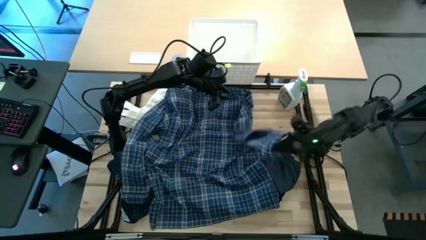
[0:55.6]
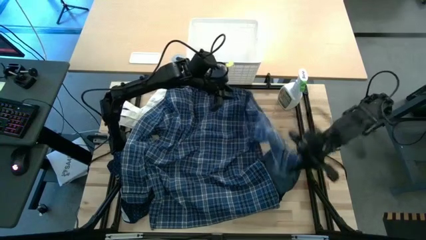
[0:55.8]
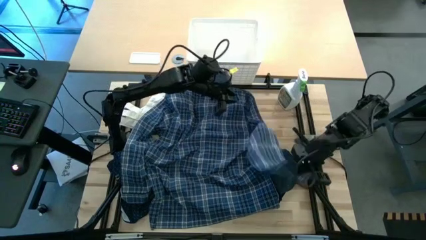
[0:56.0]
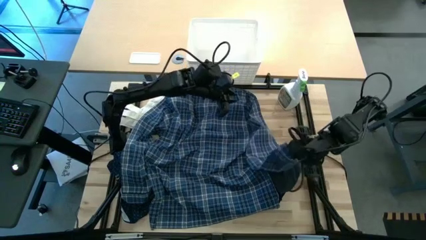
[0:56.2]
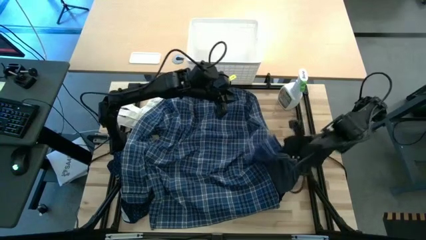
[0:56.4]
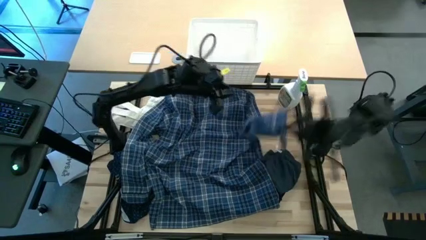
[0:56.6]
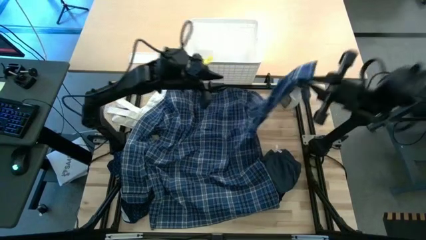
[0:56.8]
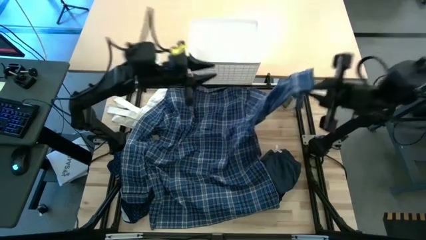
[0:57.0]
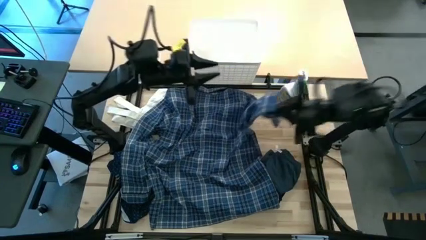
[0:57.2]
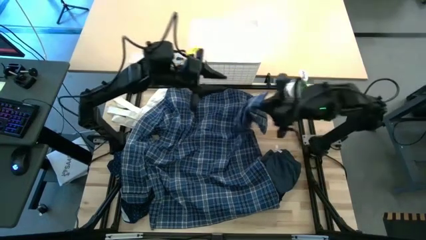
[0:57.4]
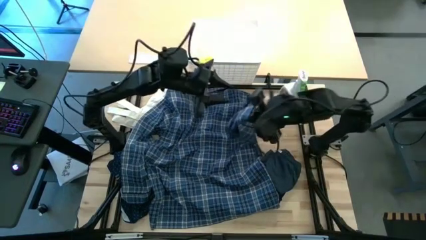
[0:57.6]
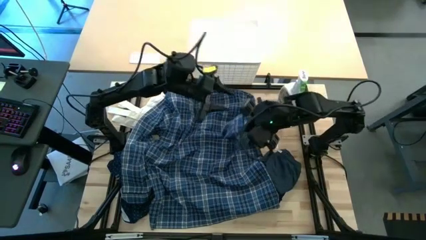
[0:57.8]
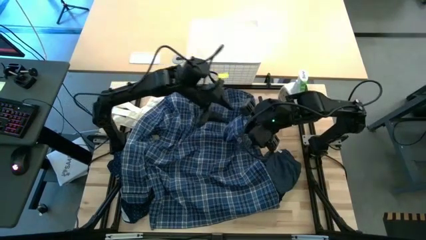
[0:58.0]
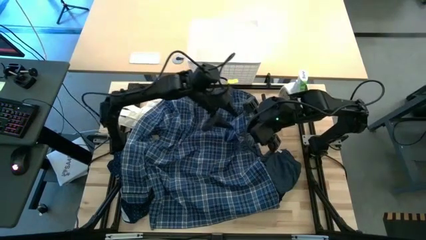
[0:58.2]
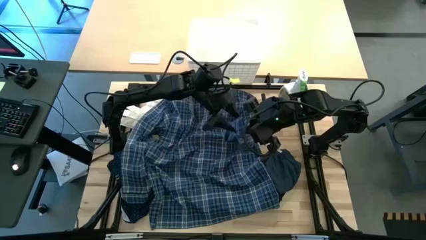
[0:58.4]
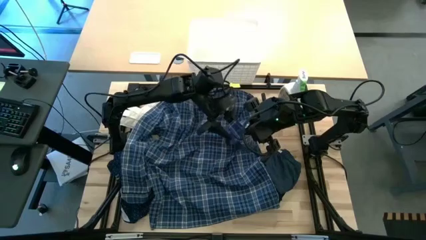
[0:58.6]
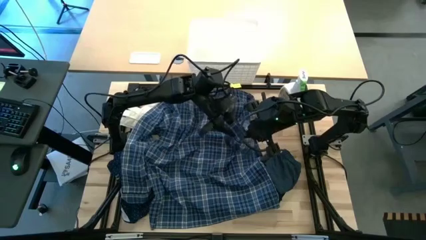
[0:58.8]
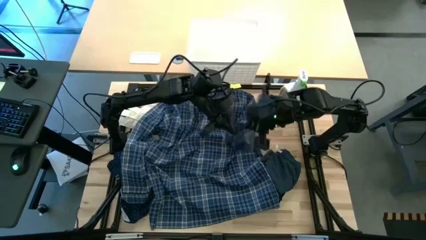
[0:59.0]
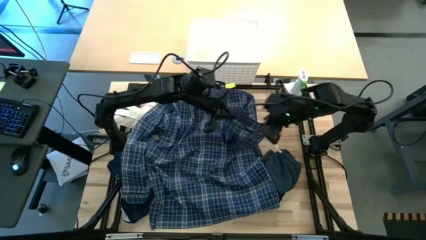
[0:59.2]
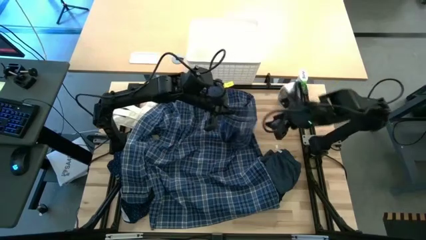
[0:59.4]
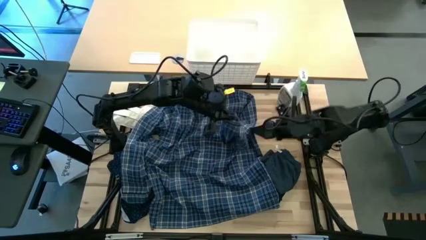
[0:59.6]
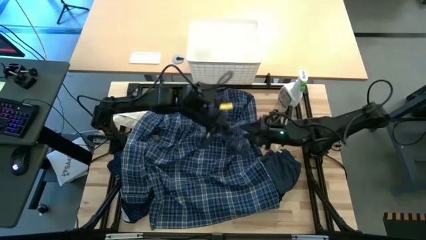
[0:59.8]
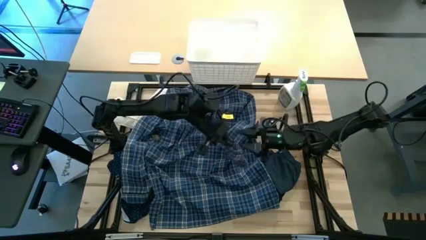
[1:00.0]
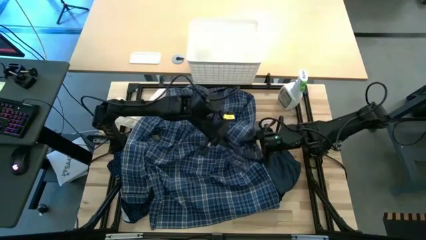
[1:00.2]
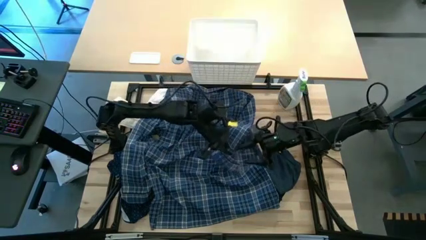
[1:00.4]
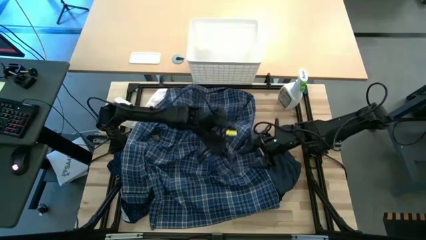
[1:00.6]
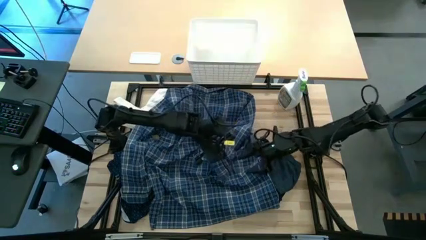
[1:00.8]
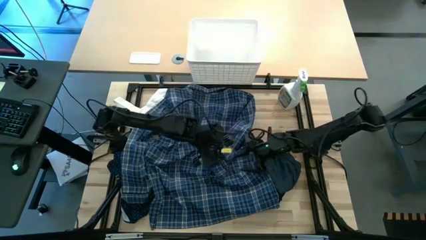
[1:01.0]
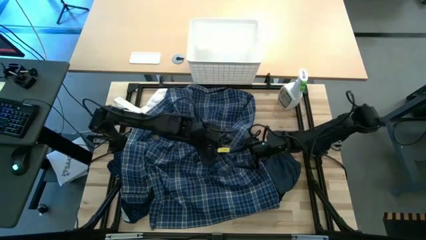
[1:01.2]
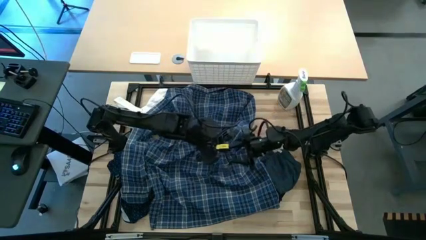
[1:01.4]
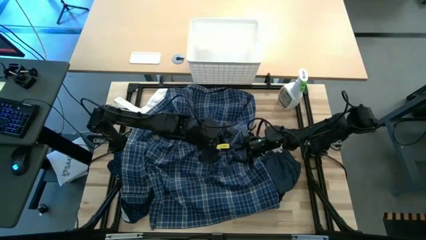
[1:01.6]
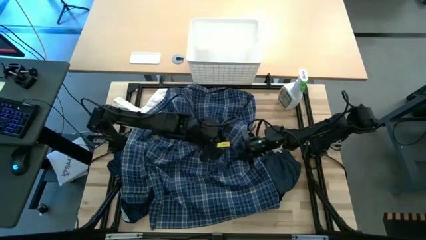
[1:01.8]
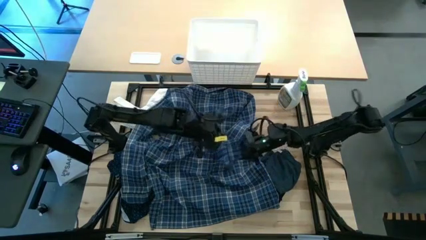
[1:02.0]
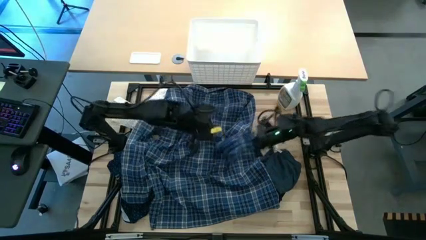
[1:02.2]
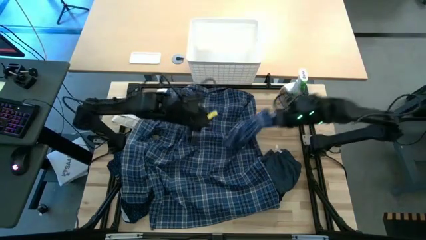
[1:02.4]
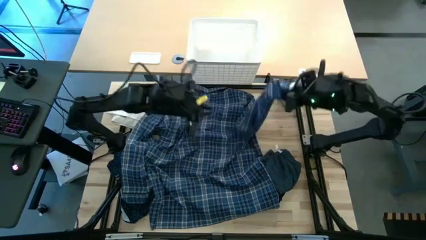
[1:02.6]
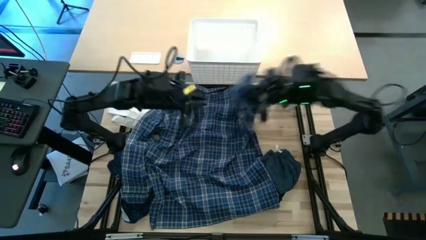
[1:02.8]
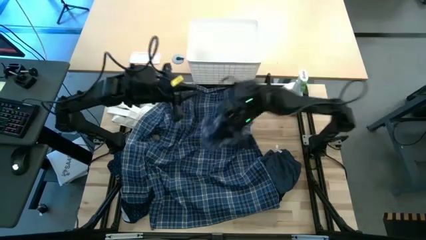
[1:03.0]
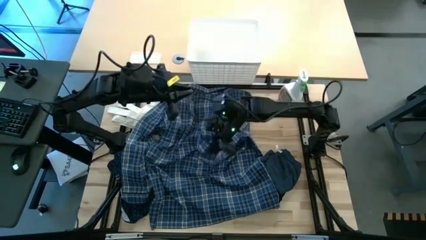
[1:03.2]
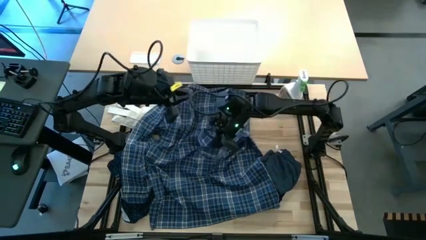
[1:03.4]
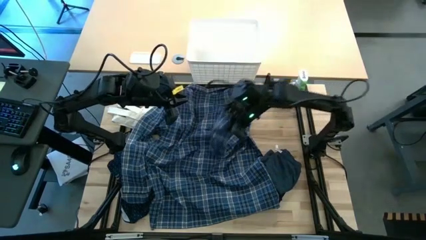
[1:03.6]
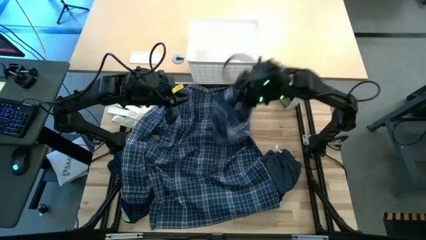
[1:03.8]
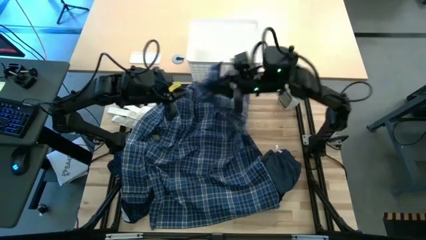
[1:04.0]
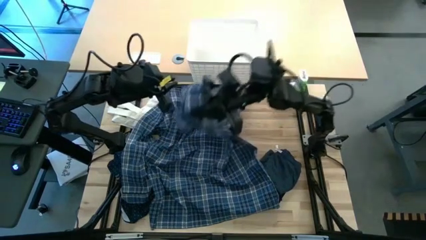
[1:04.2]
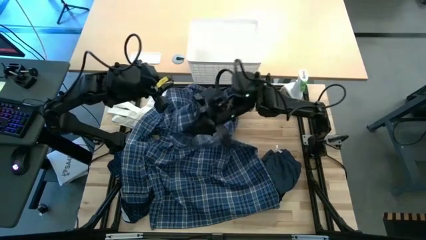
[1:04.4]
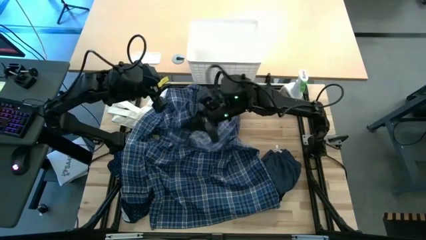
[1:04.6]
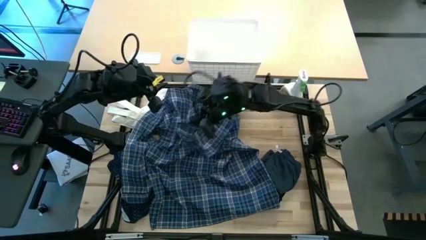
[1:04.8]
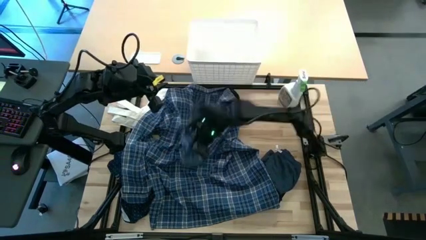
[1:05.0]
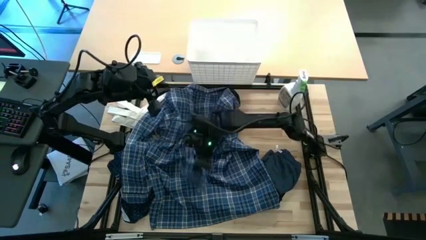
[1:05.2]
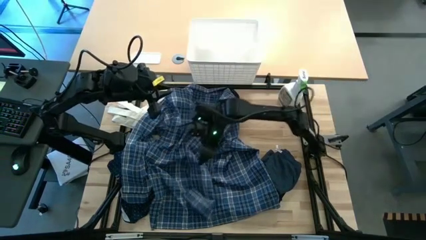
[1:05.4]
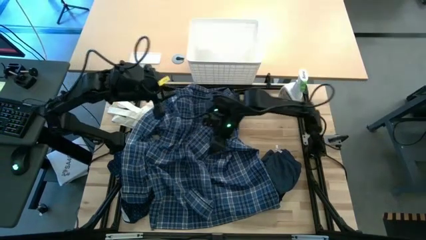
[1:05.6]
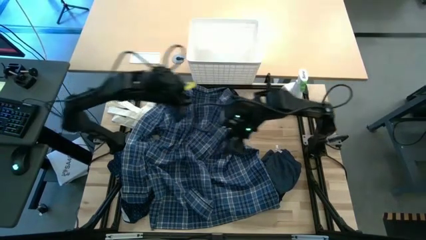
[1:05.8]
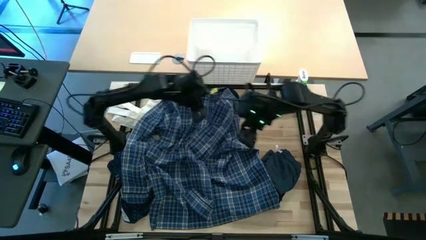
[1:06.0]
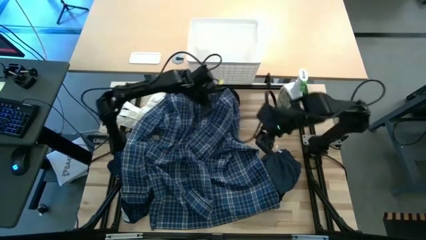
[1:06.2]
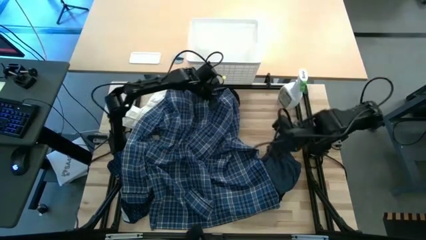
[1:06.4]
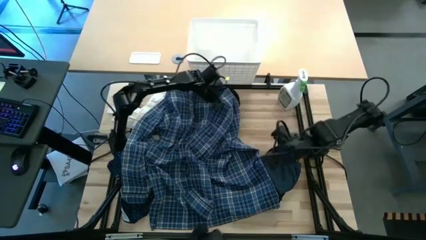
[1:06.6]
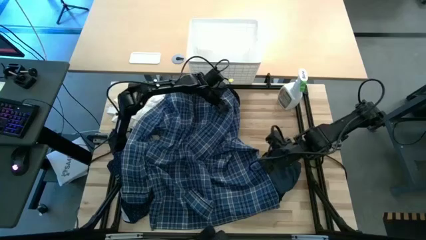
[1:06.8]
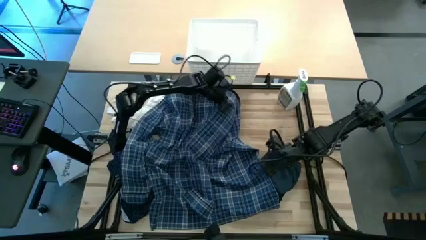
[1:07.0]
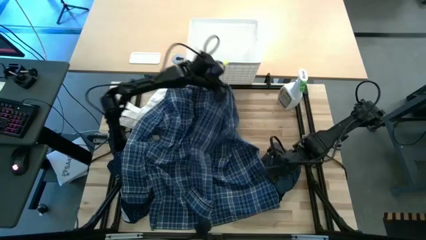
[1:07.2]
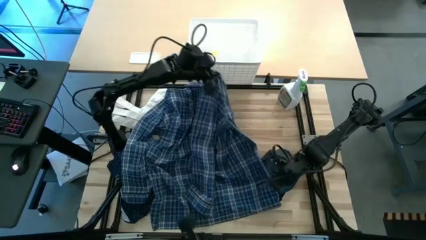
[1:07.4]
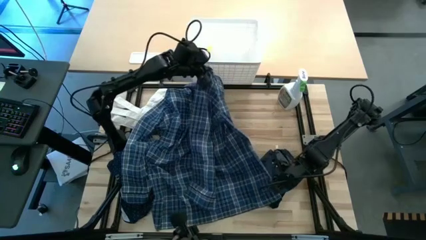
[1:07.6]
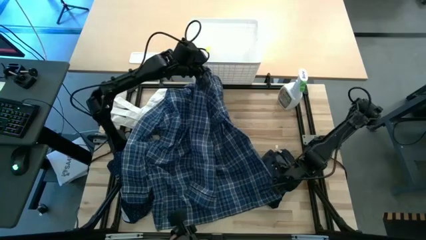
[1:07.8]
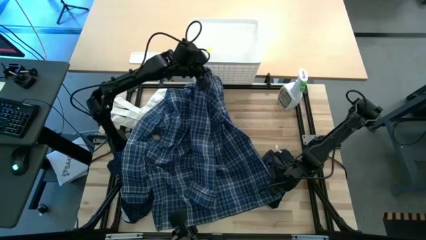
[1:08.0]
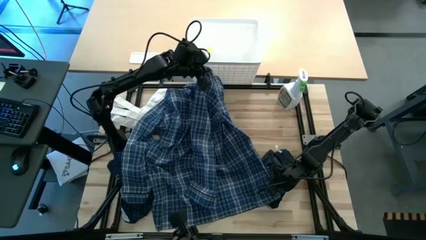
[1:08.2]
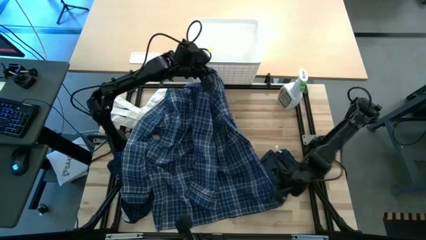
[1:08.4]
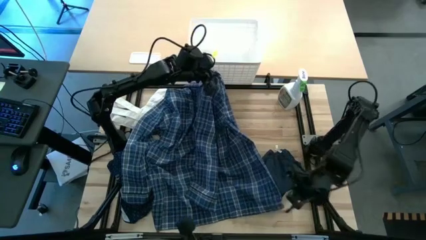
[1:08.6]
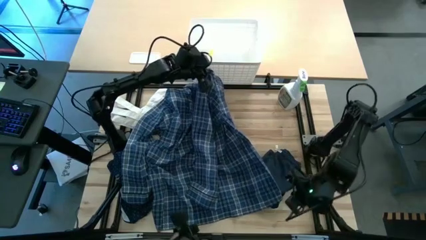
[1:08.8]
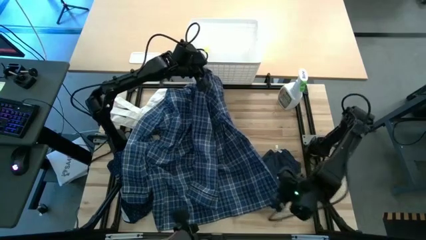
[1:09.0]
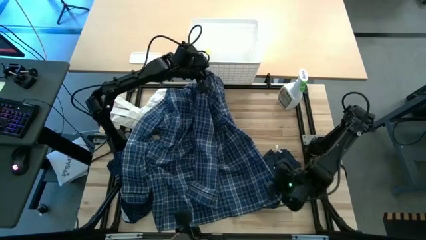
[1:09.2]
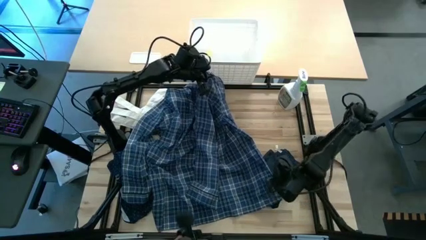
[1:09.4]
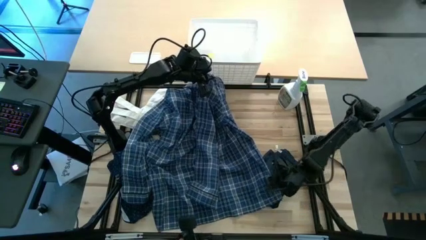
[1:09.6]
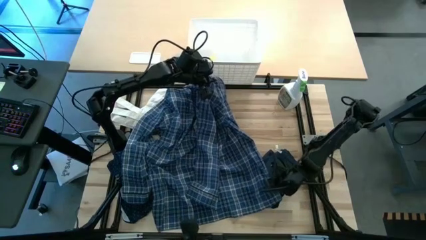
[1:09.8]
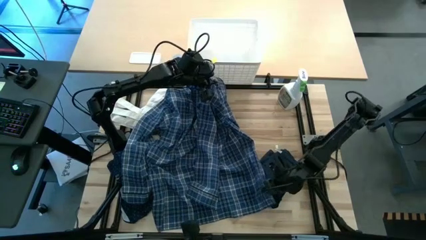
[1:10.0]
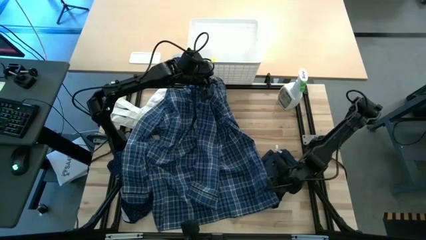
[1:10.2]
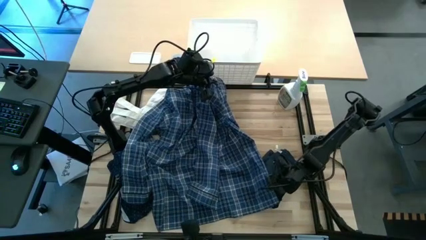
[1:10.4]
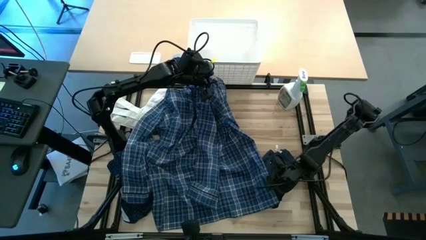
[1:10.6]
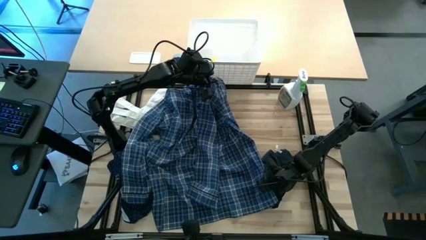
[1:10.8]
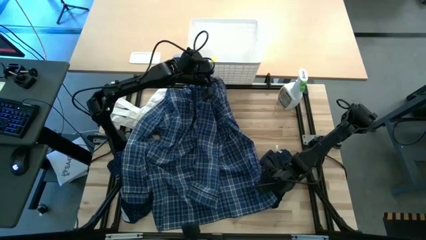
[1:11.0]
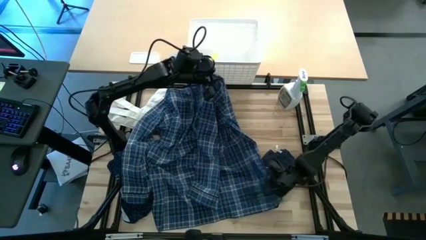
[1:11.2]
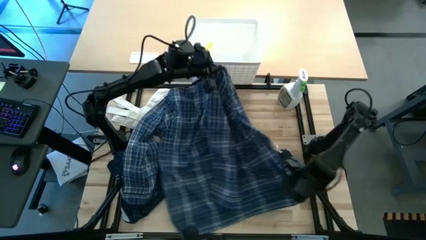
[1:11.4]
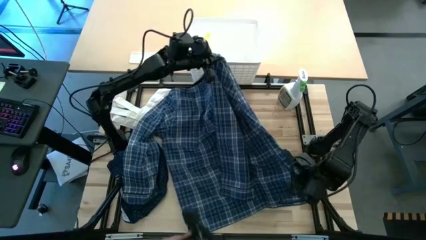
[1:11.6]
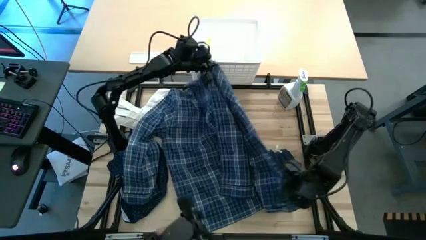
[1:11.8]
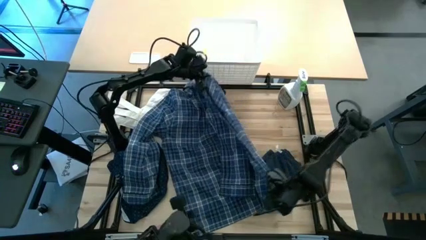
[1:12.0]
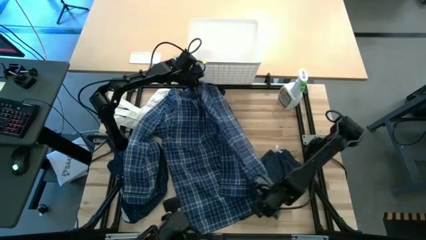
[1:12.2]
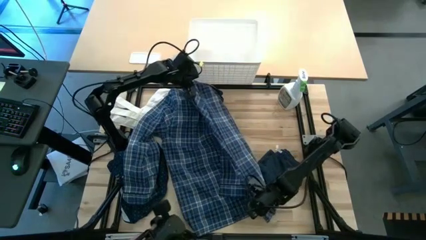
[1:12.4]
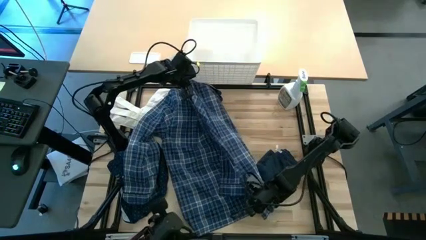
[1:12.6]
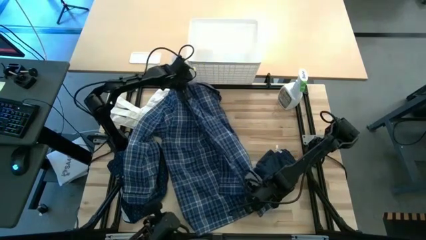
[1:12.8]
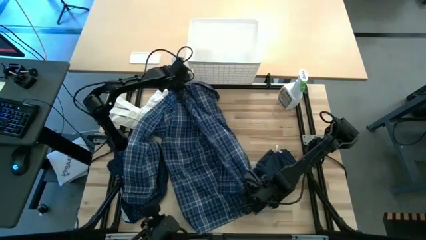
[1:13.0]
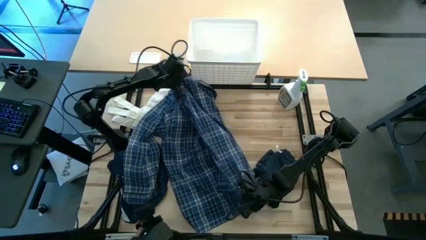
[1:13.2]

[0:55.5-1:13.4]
Fold the blue checkered long sleeve
